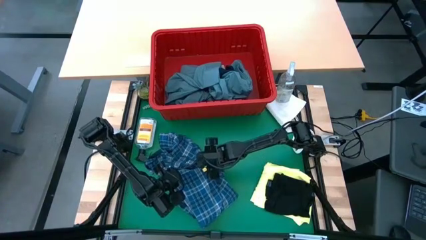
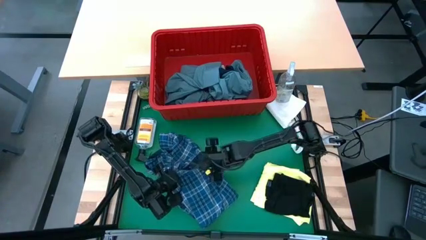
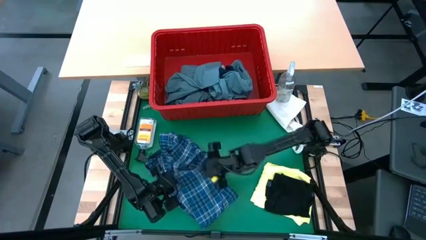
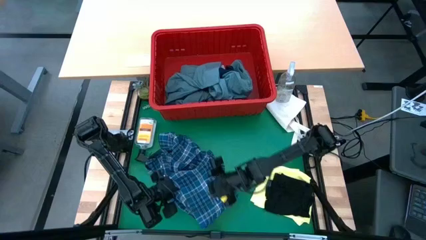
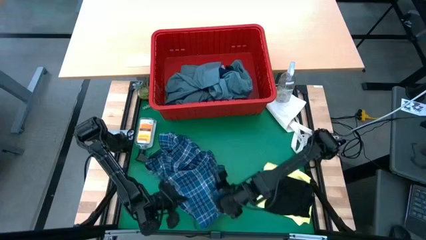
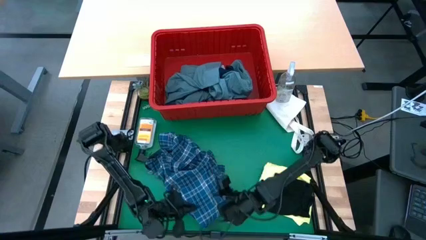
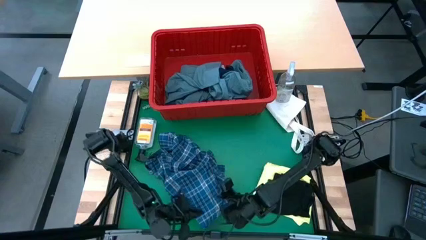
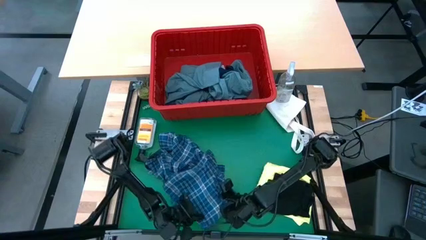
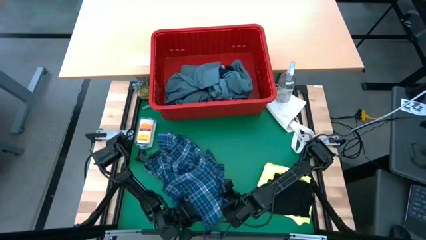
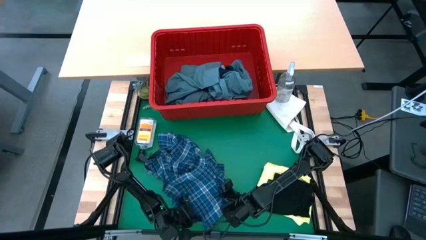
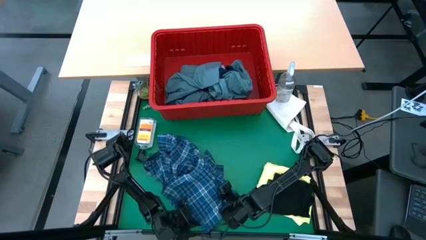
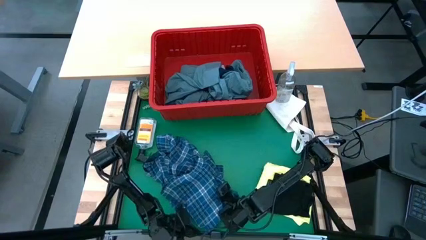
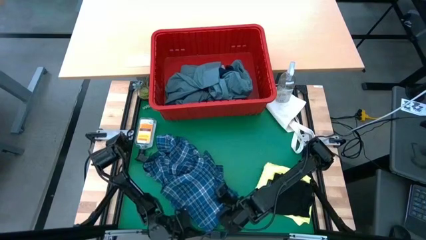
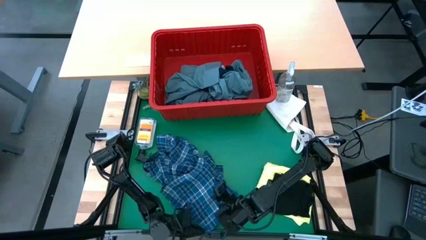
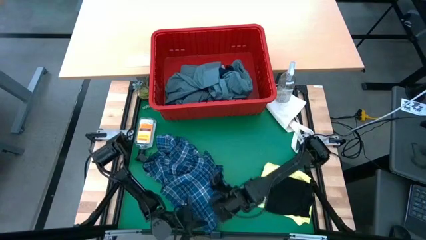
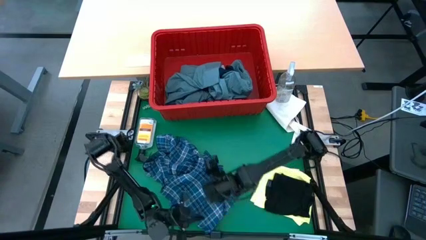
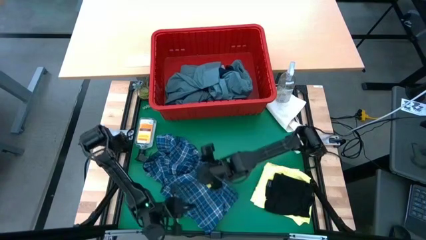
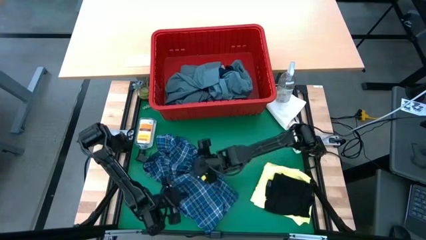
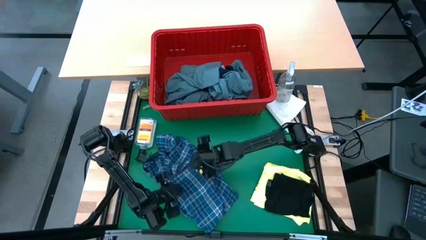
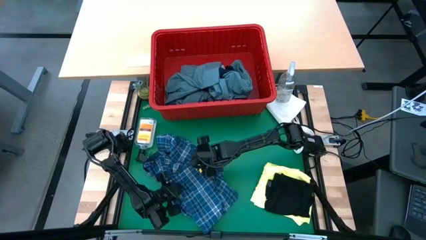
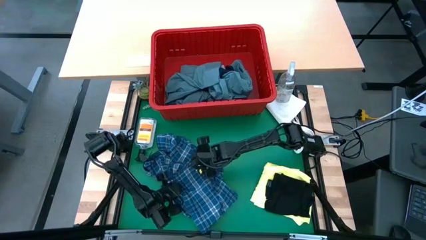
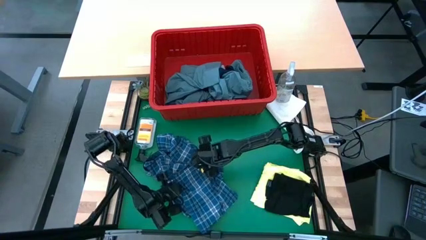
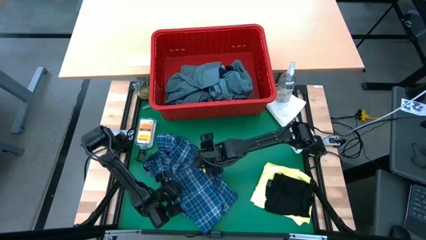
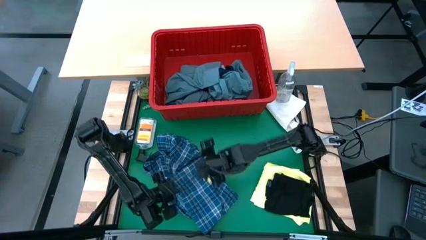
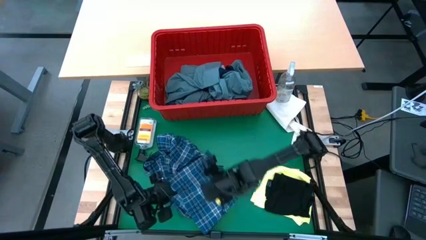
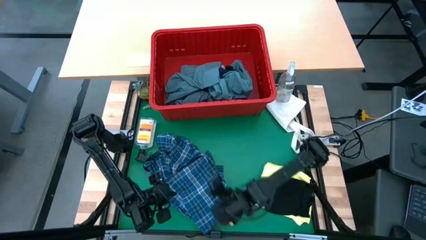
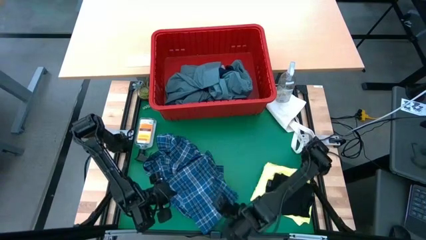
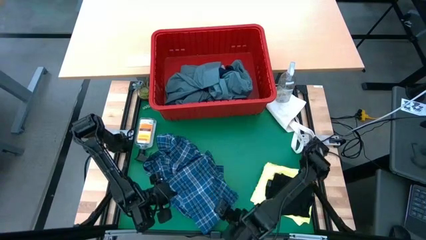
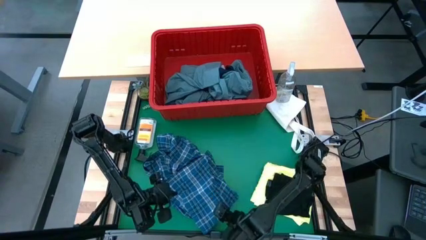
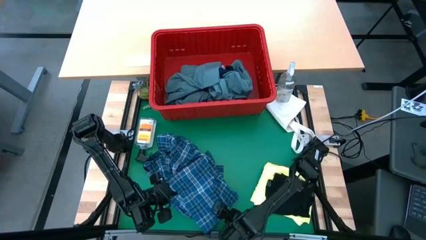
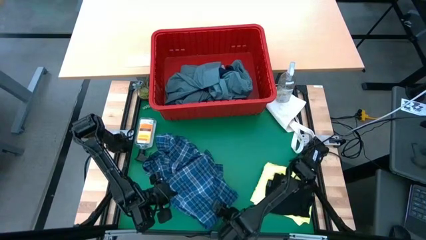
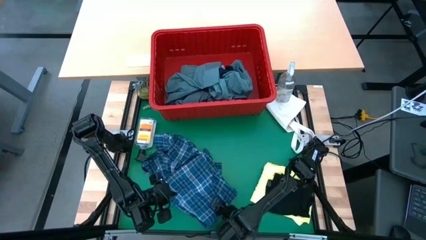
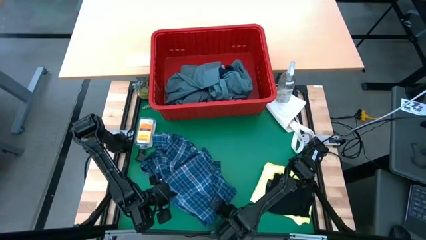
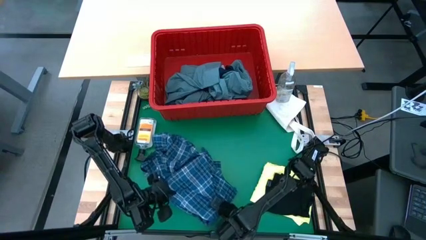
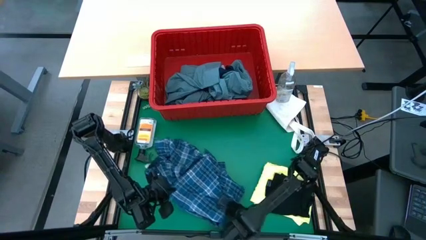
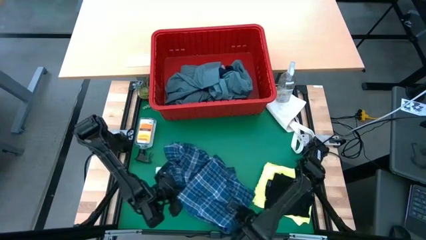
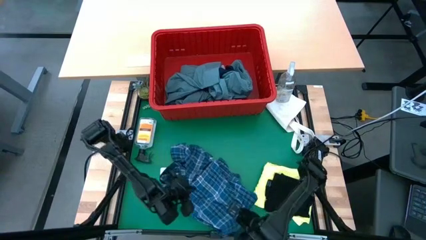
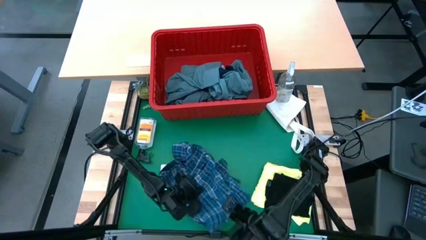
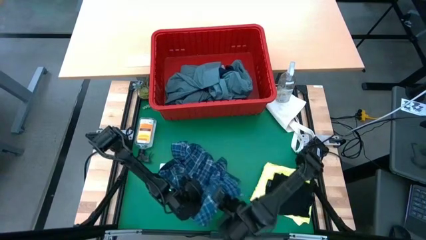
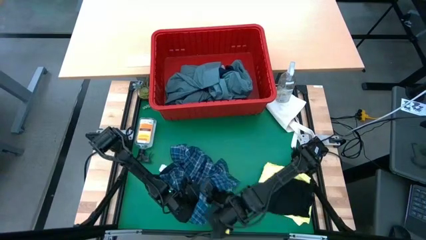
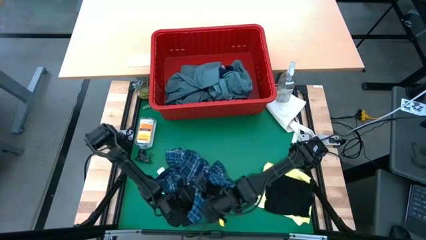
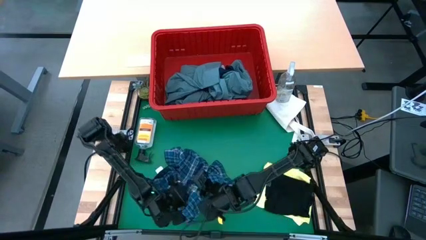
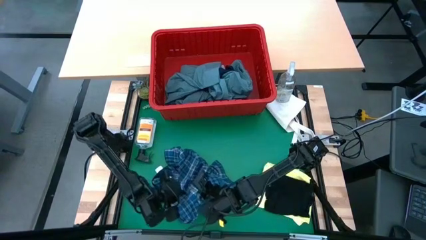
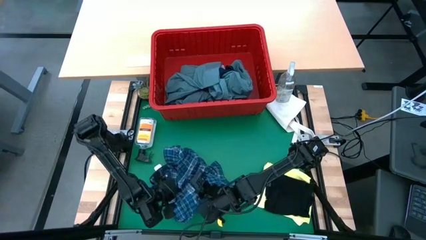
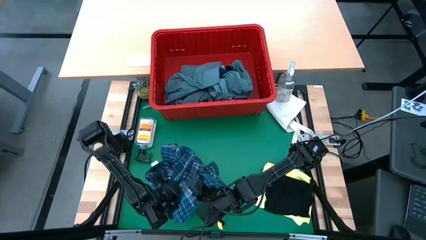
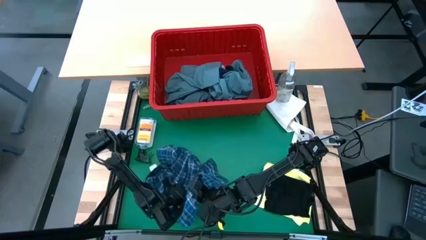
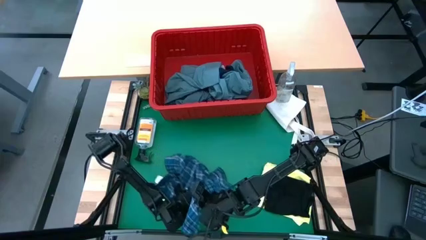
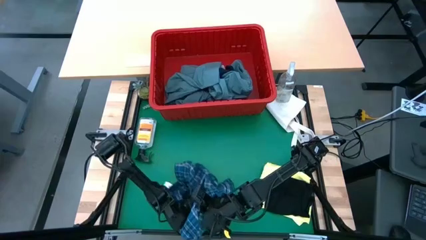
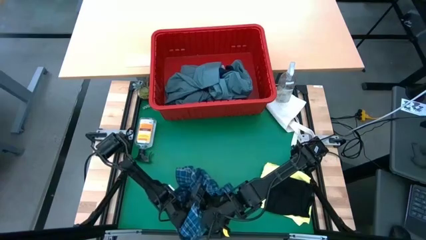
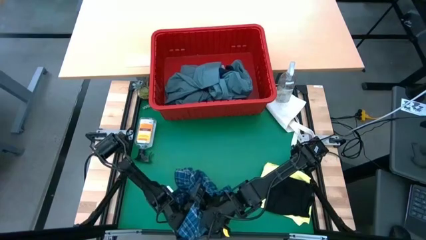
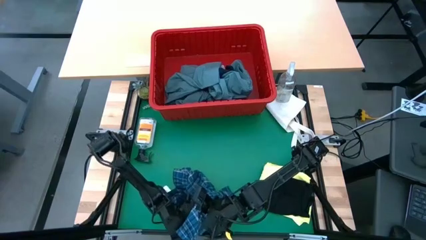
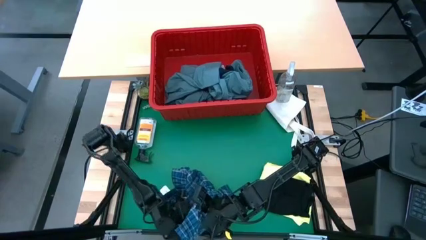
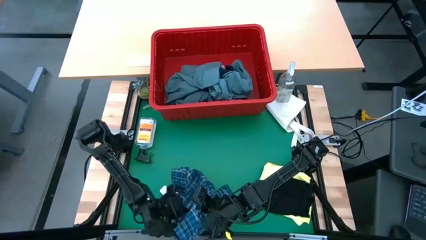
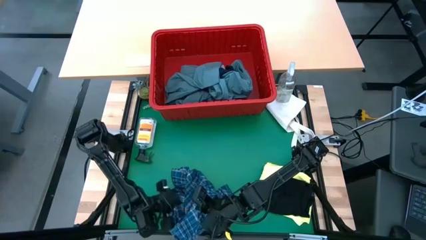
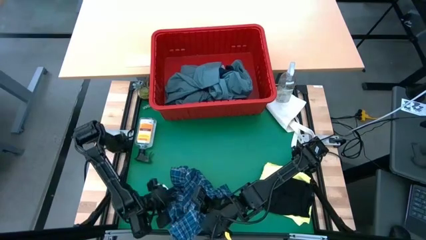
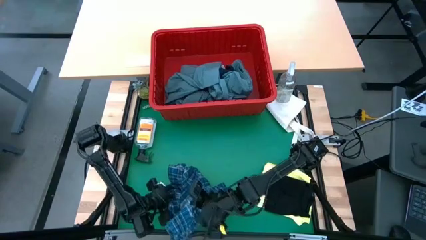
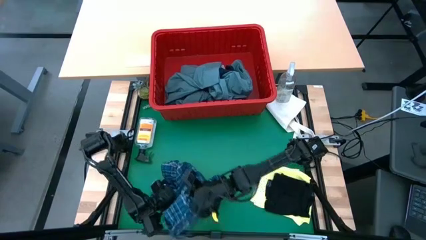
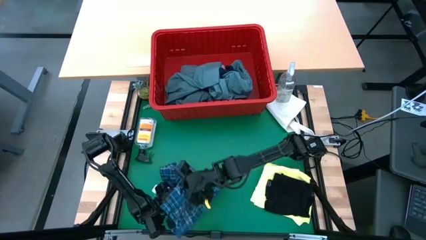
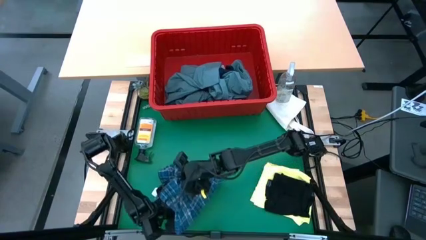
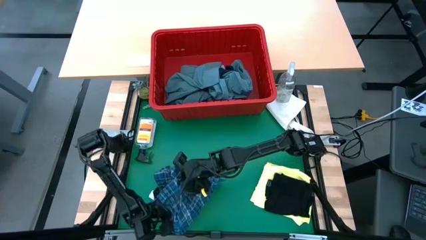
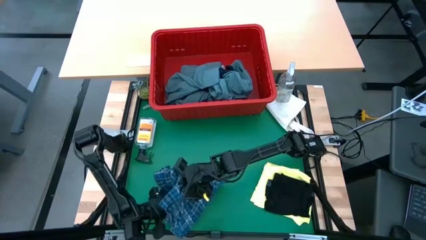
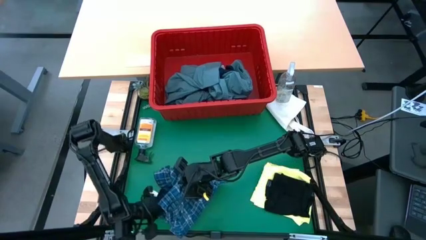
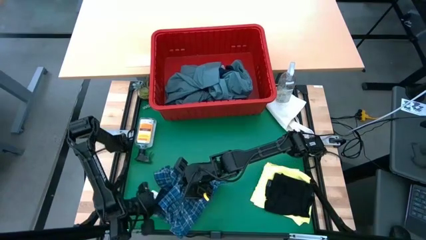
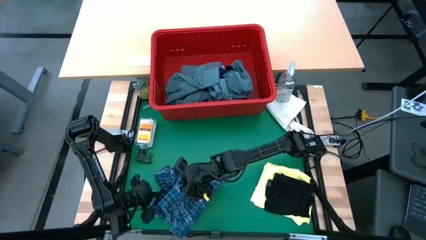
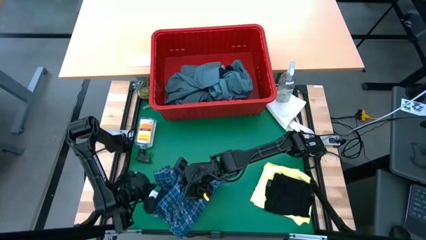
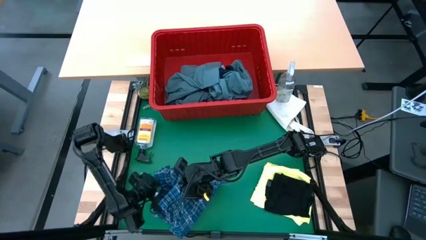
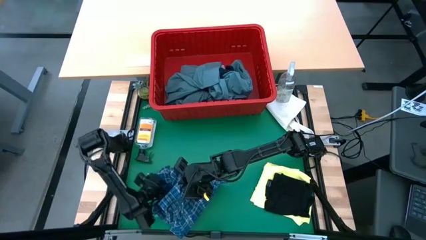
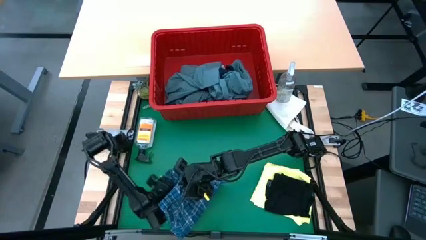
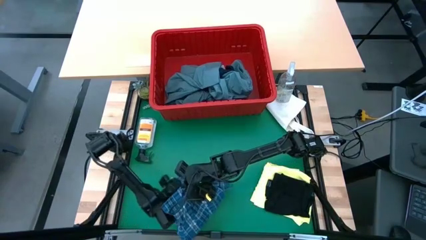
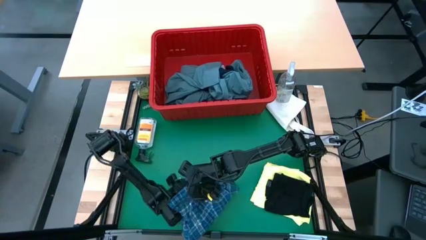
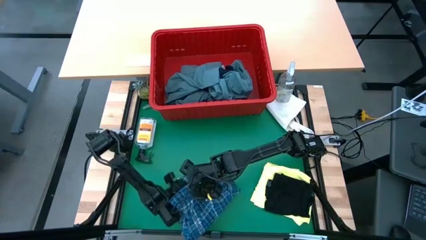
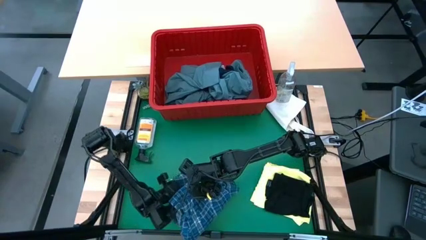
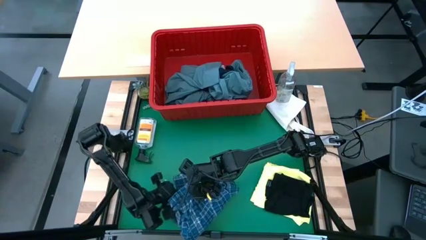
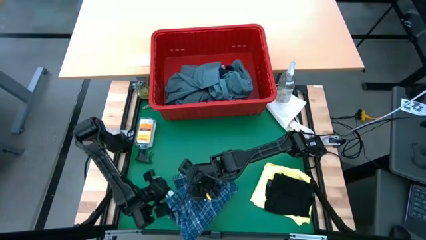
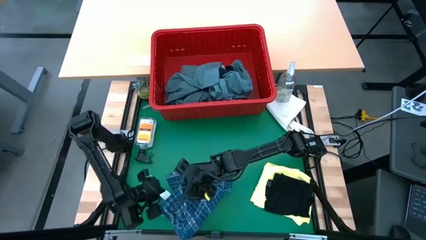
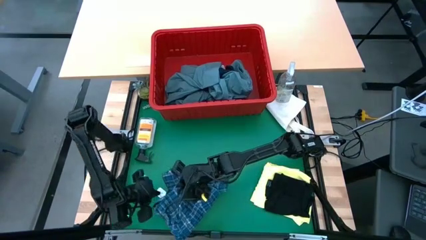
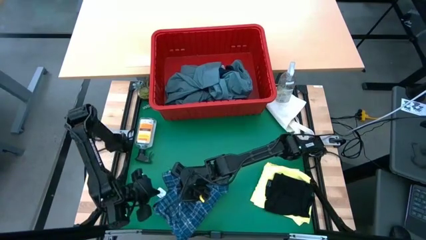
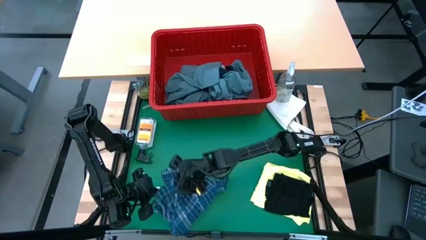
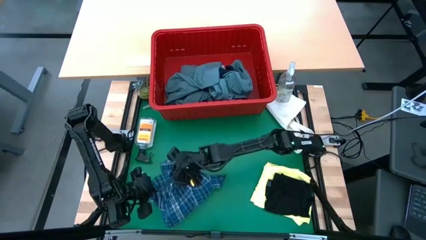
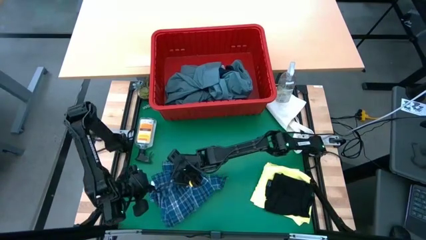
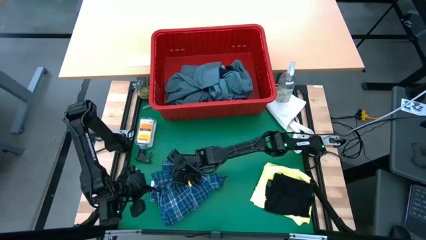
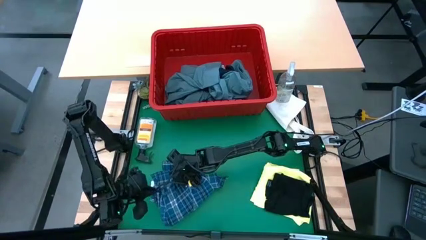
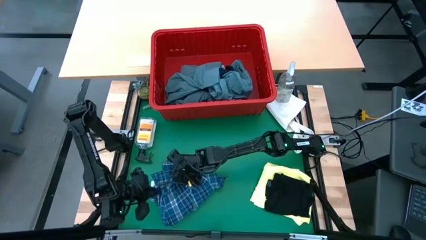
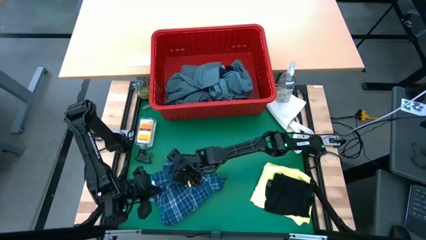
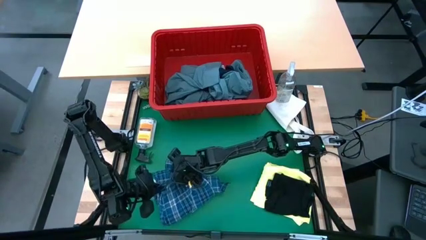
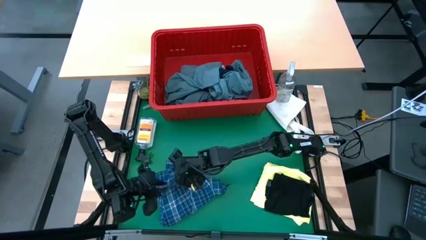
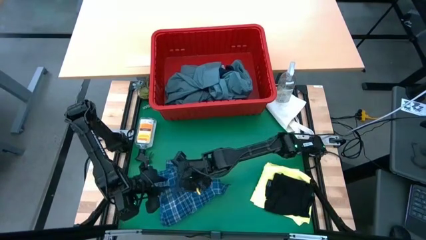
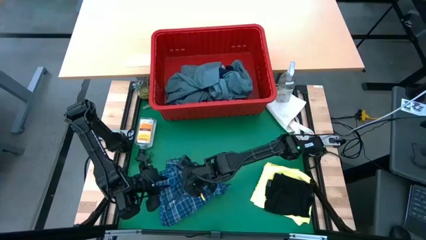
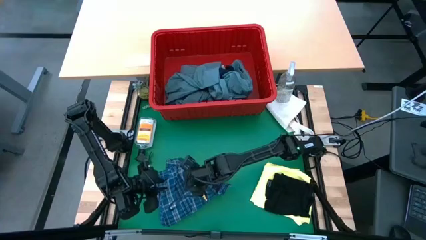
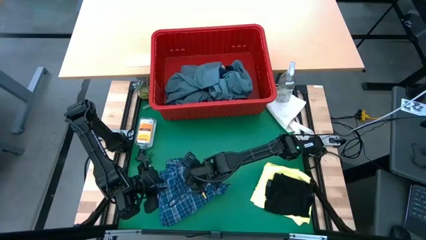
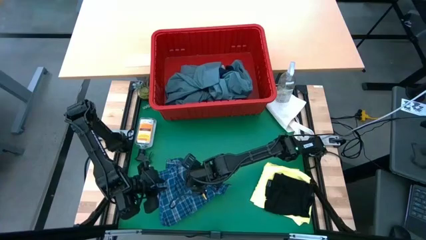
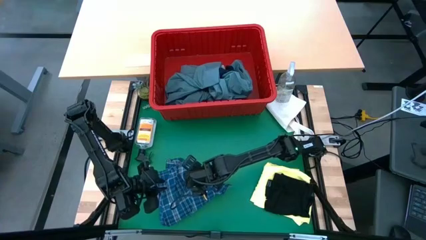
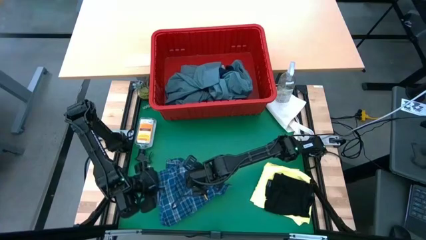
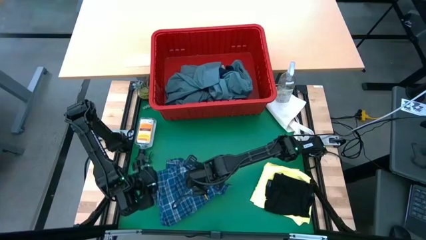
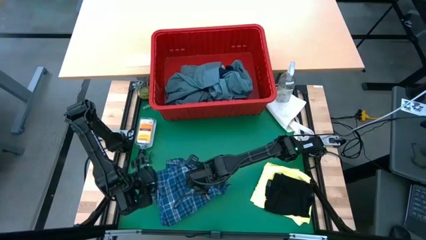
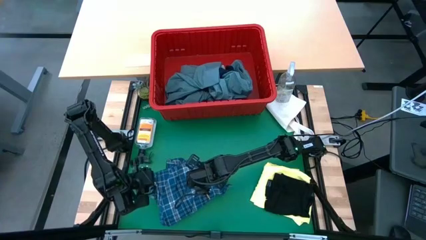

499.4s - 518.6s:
Task: Fold Laundry from Bin
Fold the blue shirt
